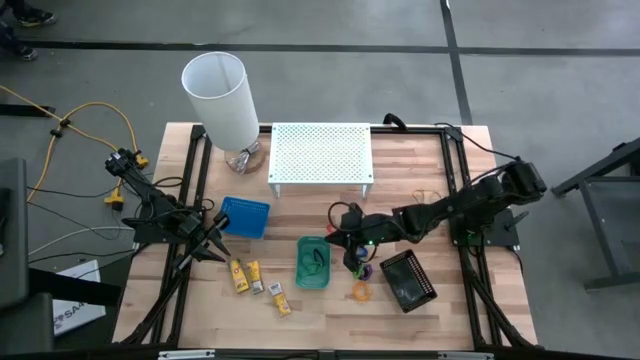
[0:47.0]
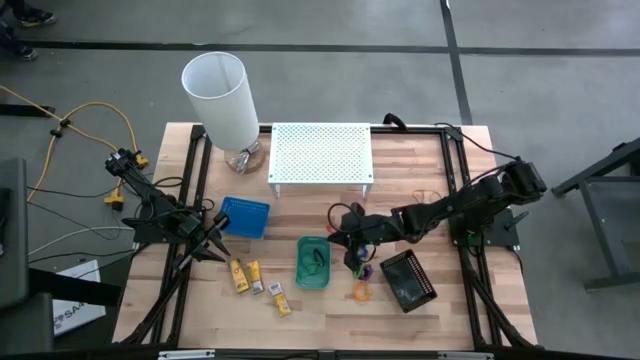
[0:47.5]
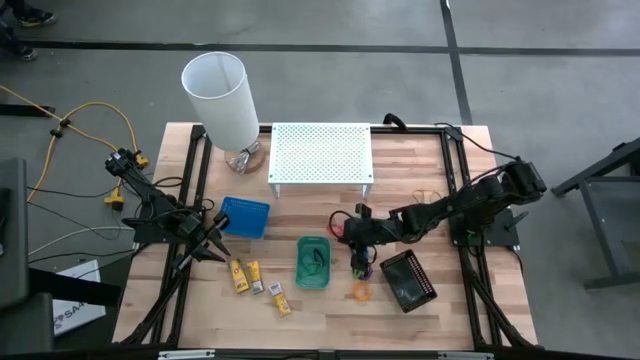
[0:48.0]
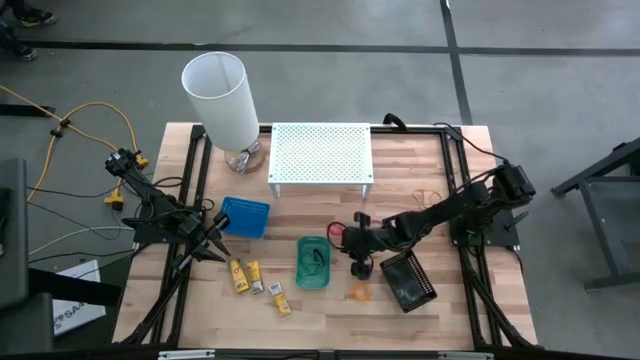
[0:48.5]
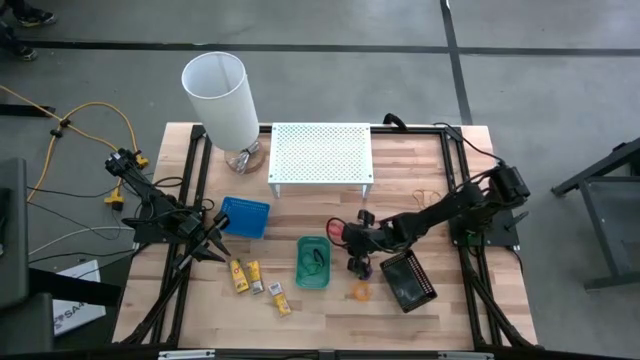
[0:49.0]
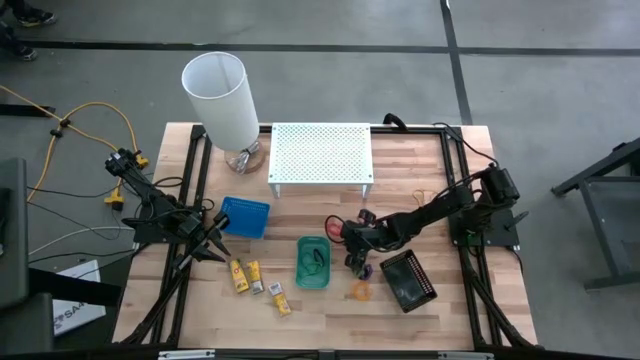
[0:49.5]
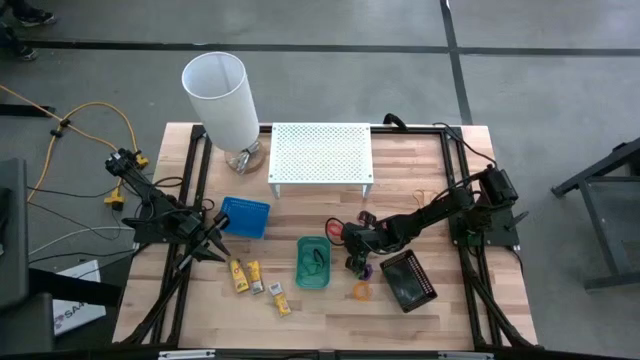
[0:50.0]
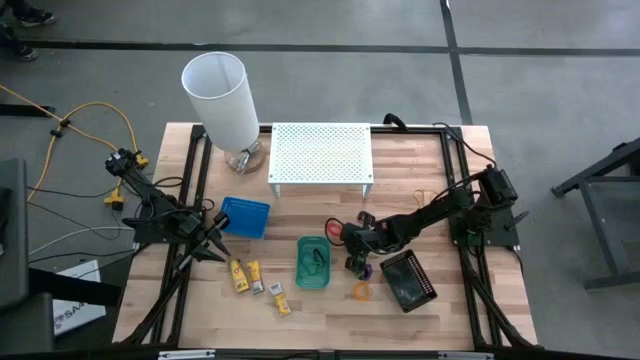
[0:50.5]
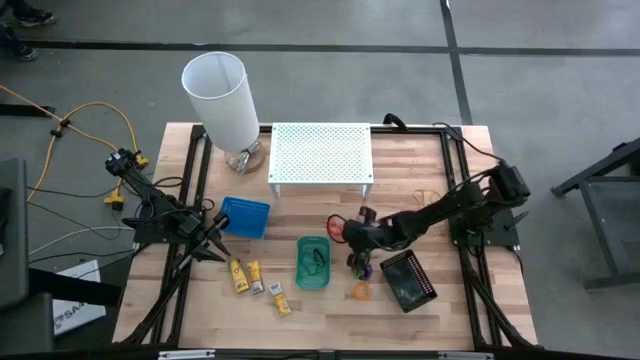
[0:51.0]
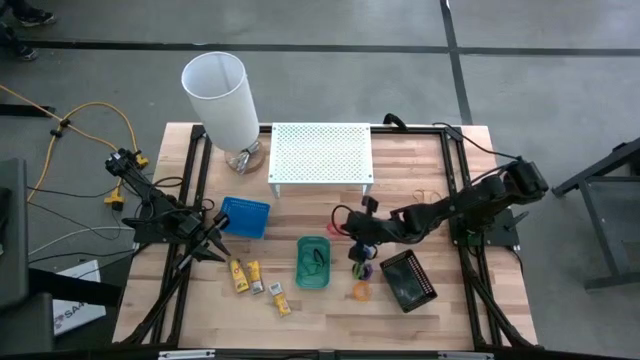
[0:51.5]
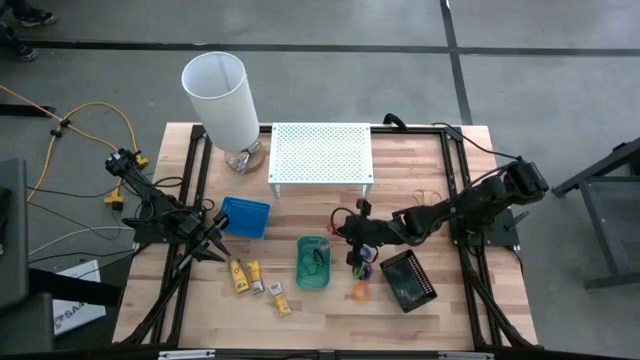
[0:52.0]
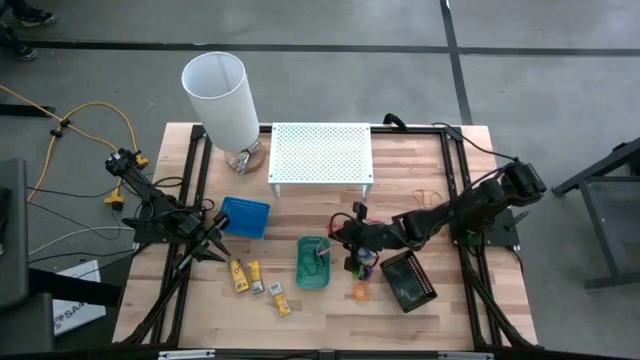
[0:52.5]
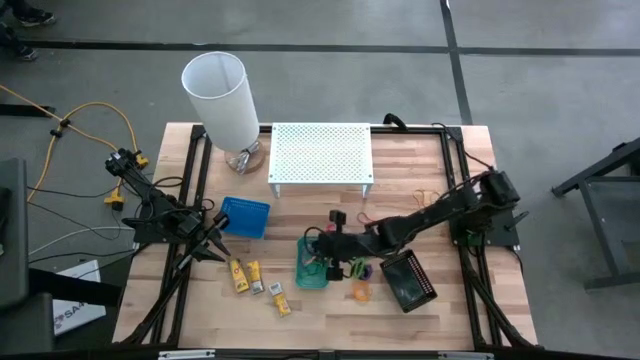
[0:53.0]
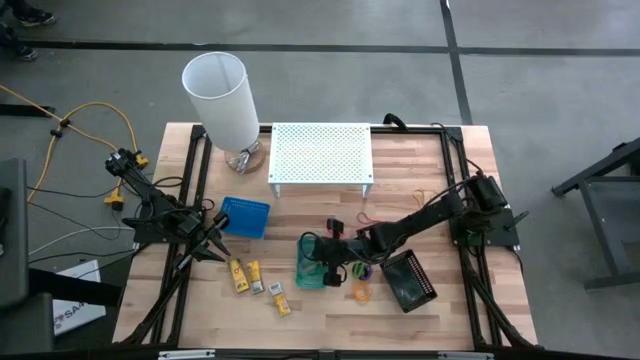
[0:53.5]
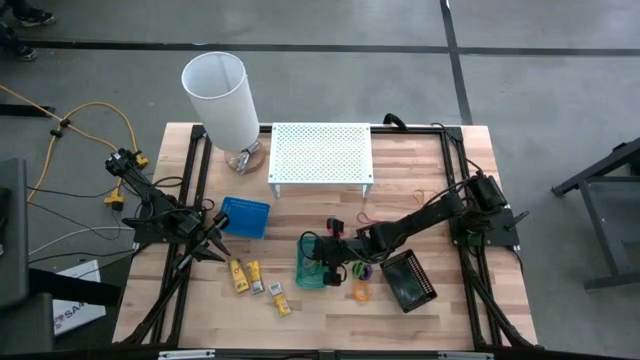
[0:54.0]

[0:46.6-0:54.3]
Task: Pick & Place Office Desk Supplies
Put the orange rubber band into the green bin

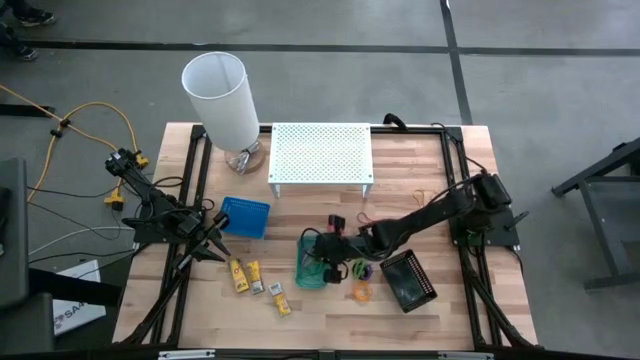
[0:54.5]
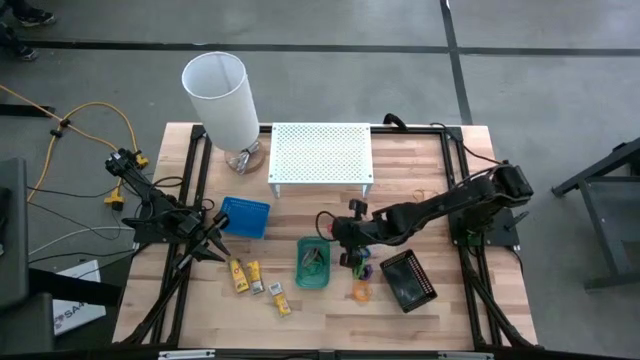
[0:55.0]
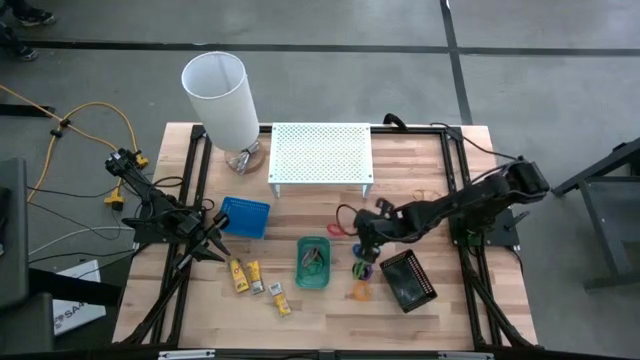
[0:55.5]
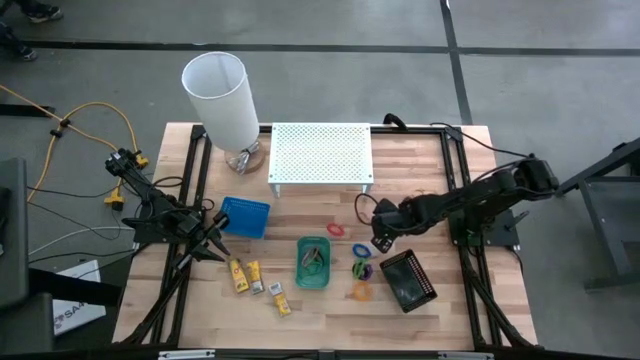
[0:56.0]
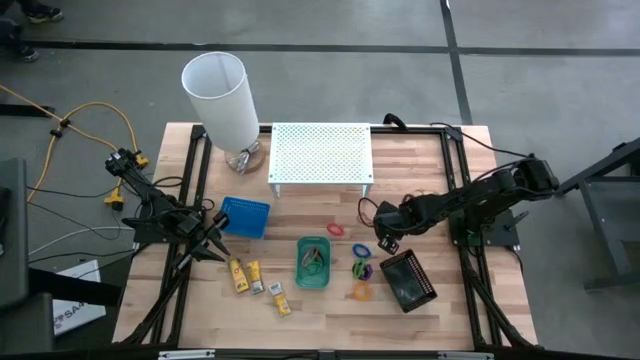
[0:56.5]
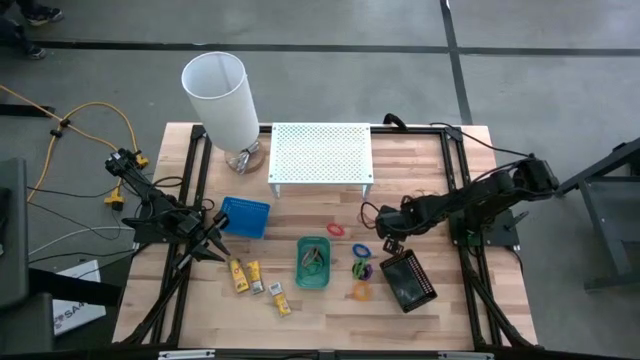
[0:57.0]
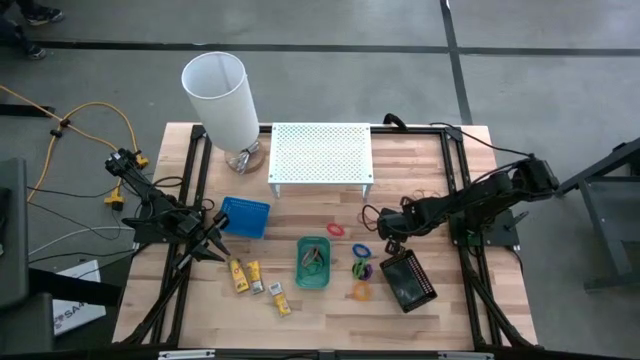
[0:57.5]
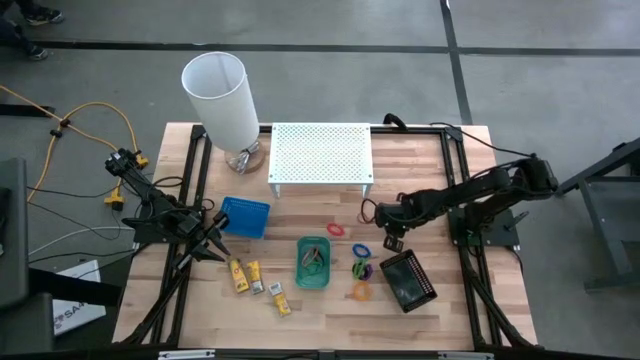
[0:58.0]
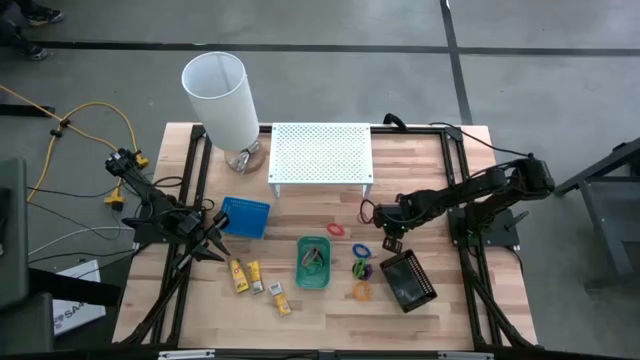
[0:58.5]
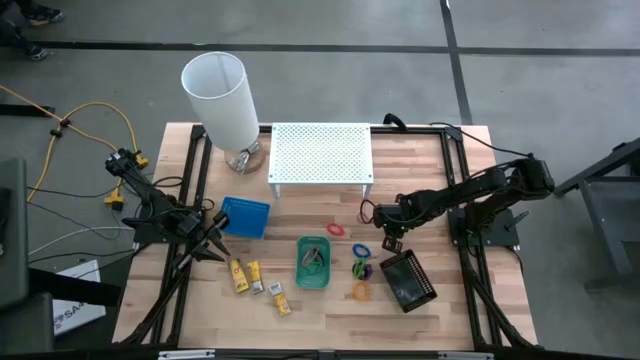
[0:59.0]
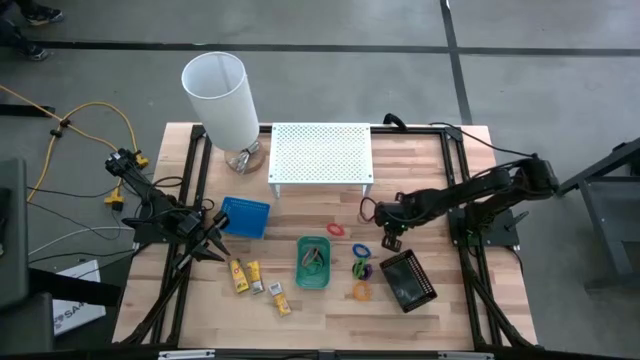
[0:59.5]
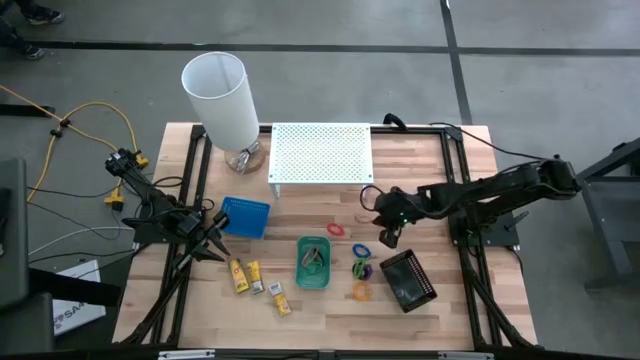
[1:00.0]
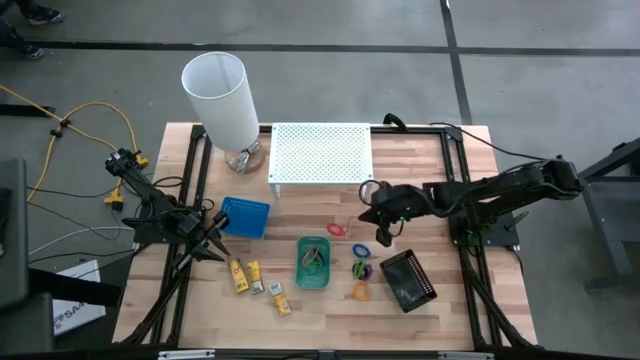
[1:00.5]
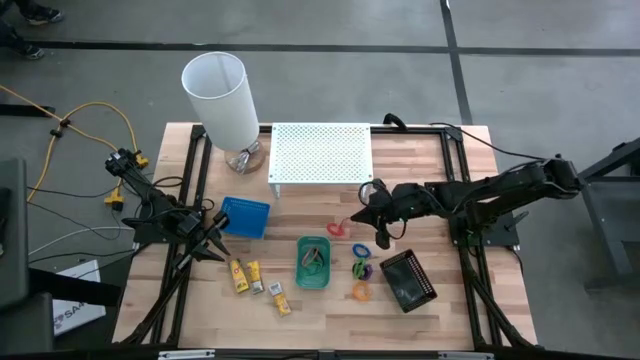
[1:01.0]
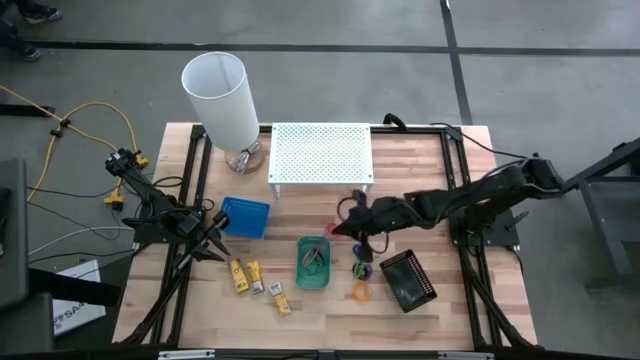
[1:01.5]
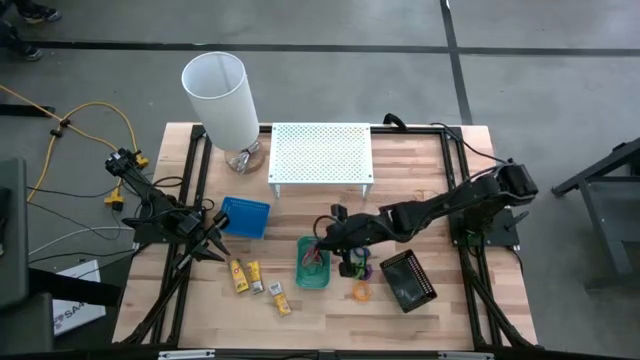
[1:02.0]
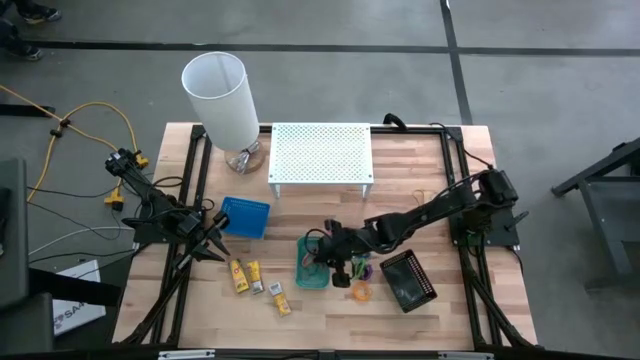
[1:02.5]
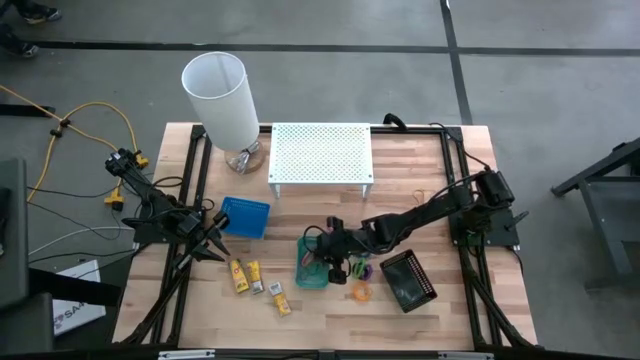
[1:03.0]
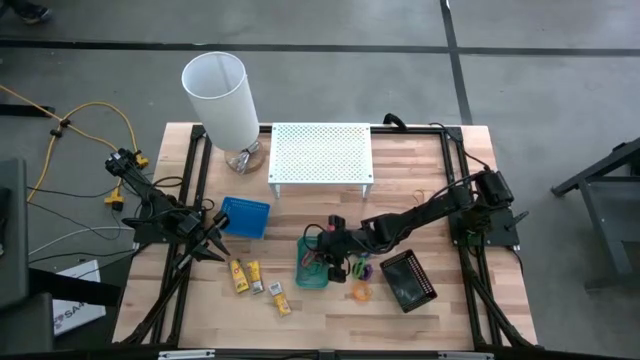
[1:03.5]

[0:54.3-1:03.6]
Put the red rubber band into the green bin

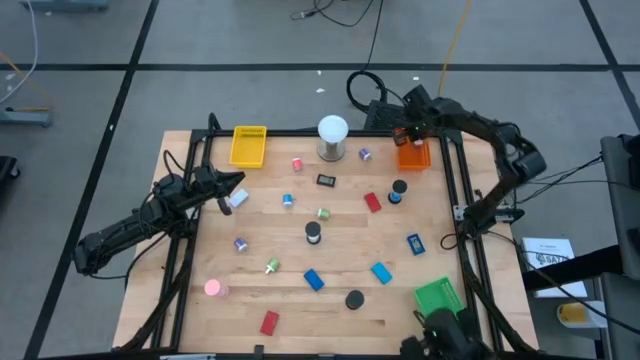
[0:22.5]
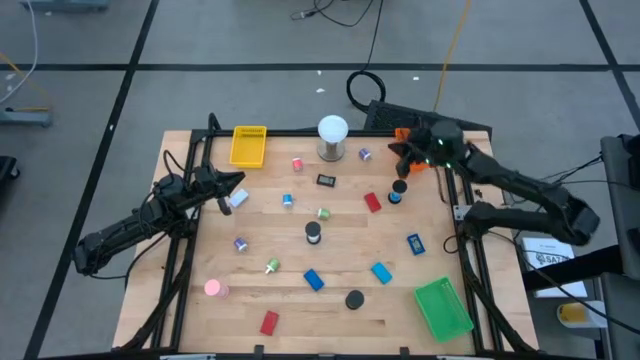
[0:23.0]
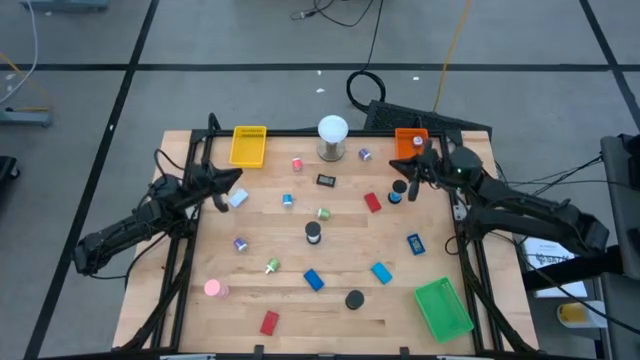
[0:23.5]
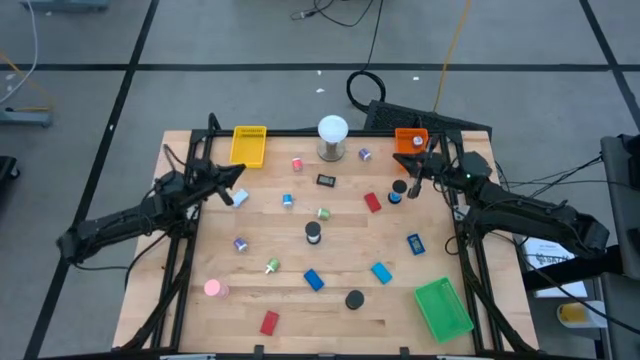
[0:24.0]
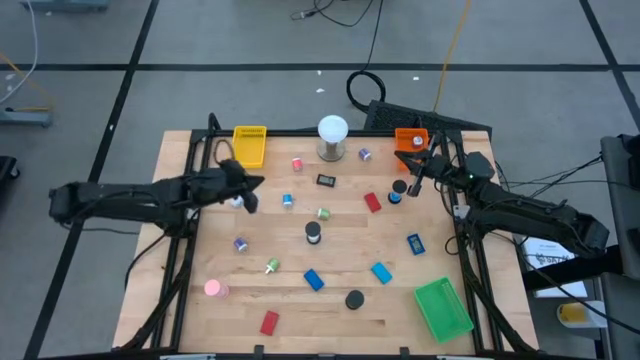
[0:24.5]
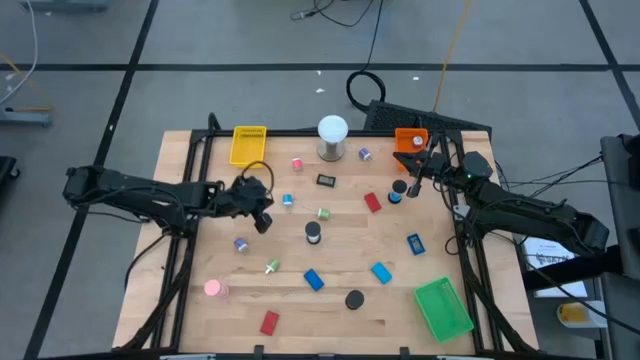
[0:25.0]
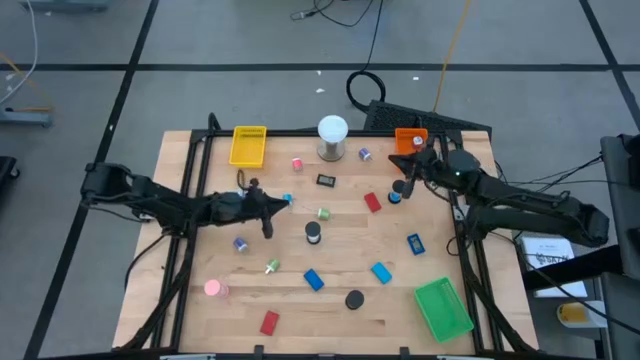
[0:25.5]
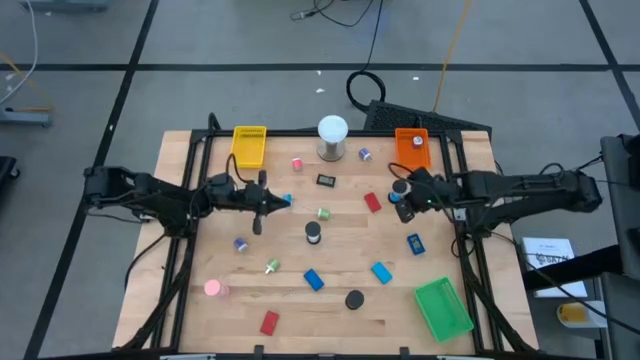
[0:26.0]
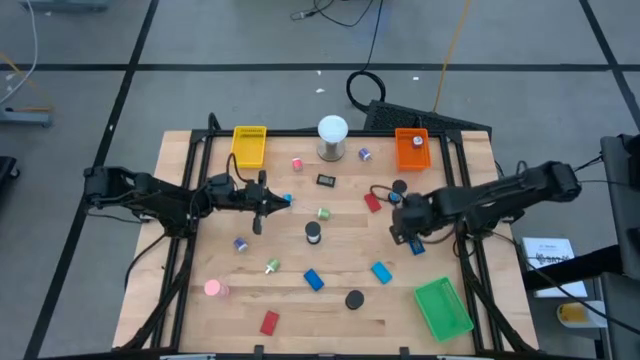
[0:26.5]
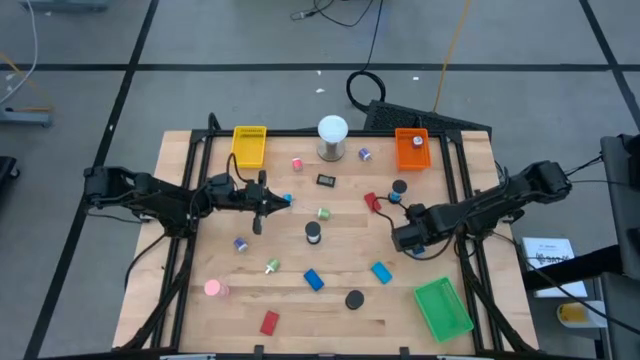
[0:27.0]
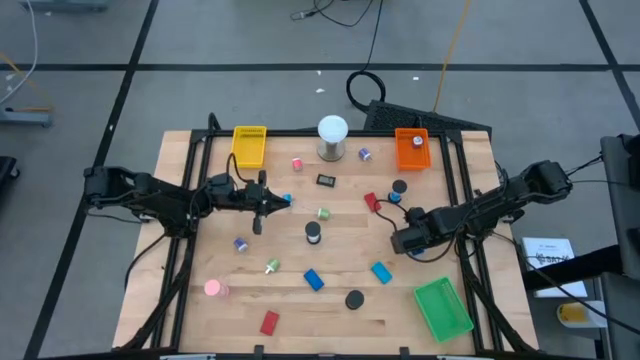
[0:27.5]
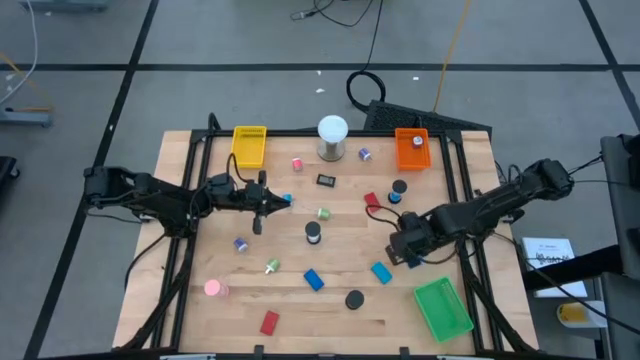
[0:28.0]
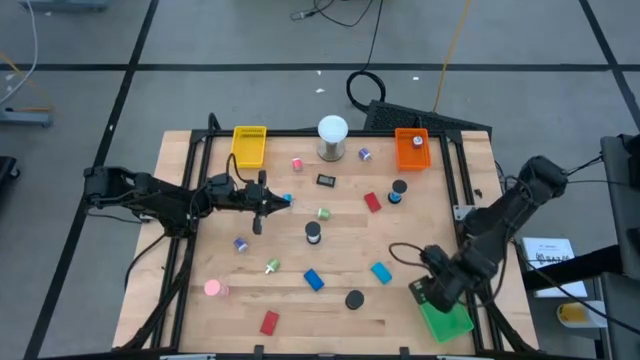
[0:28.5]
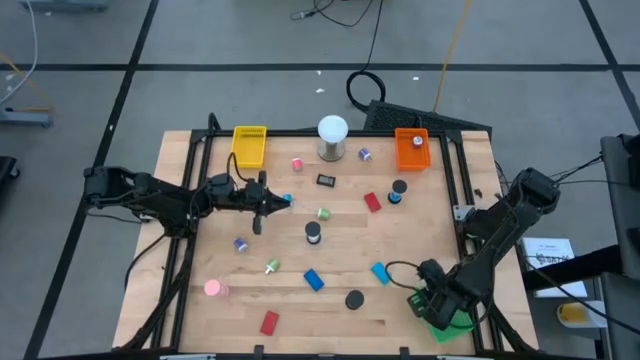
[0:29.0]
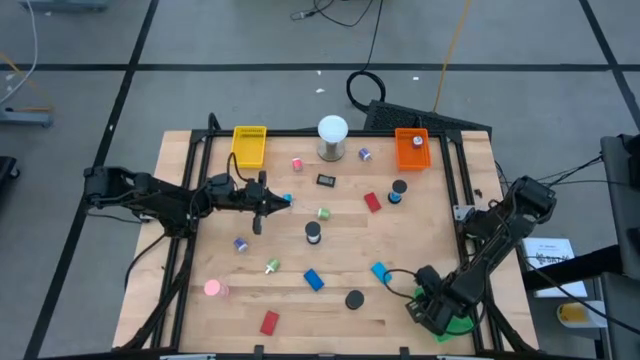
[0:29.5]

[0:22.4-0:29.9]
Task: Pick & Place Office items
Put the right blue digital clock into the green bin
